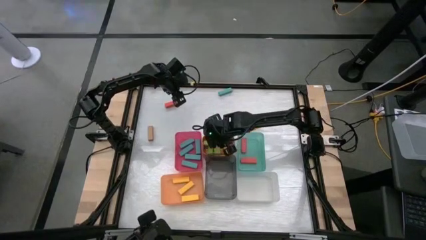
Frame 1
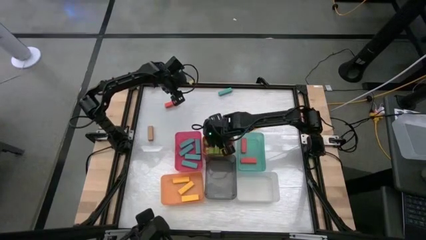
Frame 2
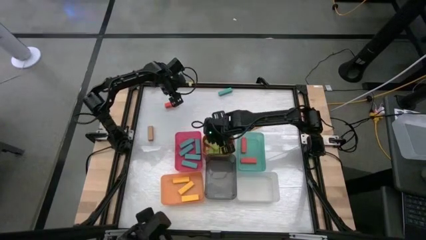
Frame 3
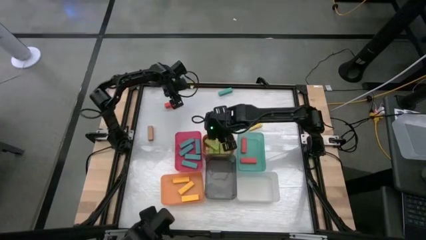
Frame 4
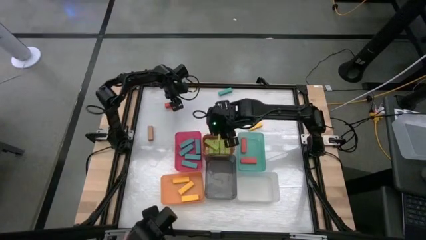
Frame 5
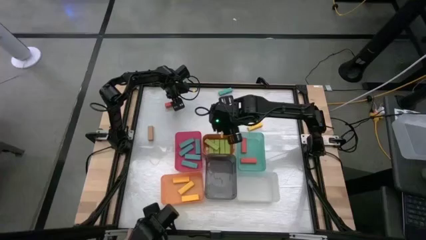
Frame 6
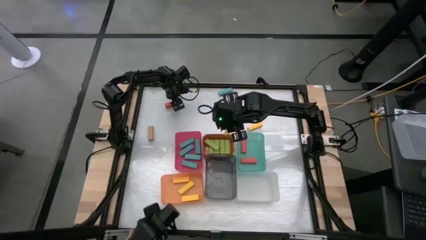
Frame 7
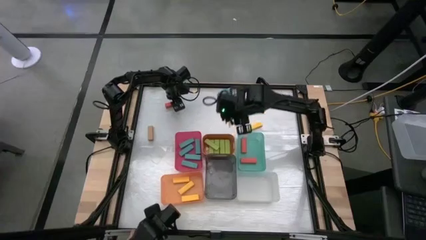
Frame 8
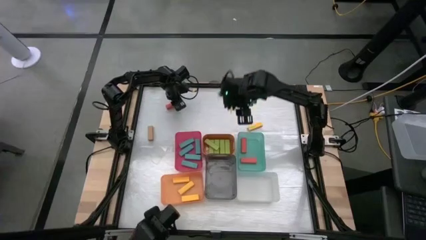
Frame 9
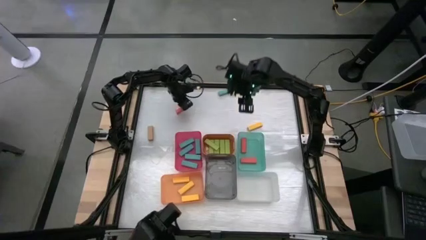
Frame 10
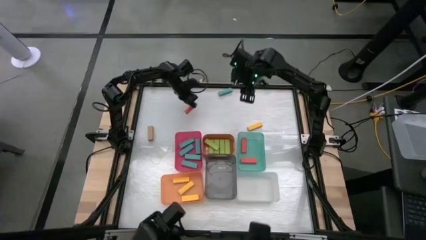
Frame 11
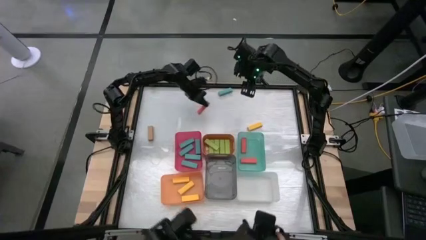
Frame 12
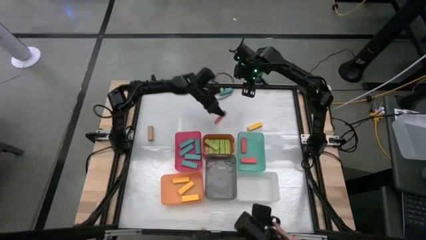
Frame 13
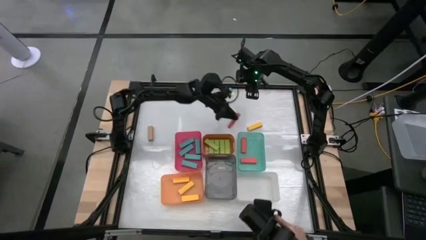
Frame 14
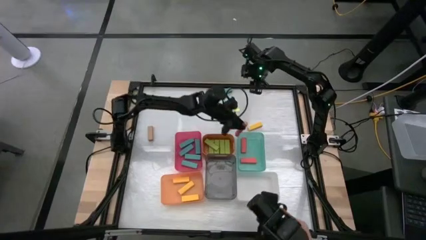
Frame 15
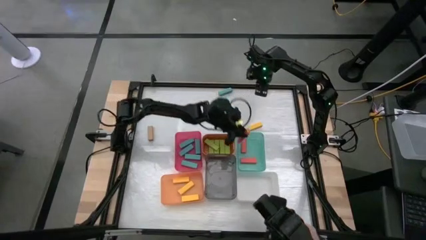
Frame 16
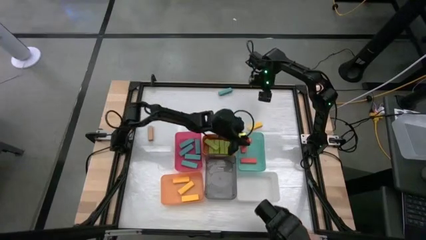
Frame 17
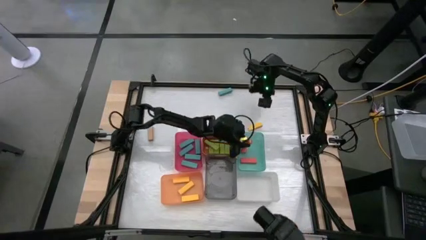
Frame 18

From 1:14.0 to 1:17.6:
Task: Sort blocks
Put the orange block into the green bin

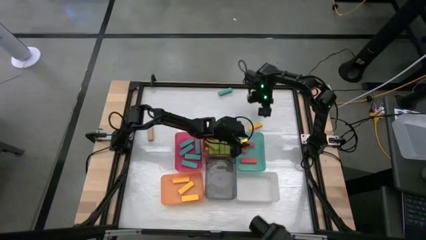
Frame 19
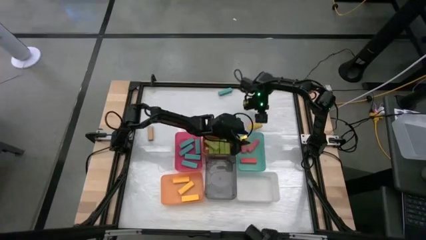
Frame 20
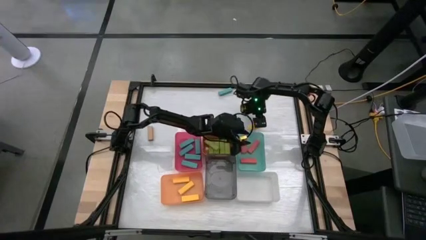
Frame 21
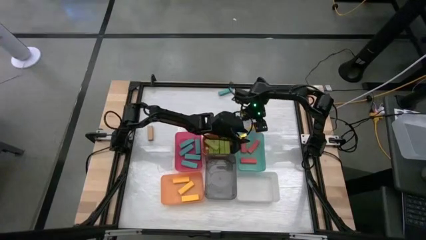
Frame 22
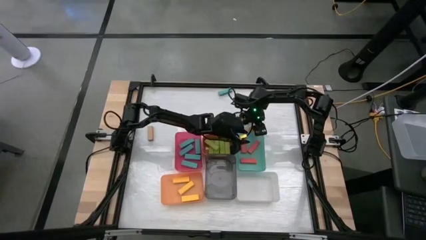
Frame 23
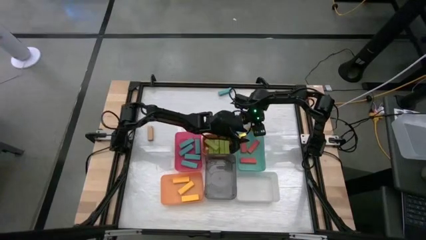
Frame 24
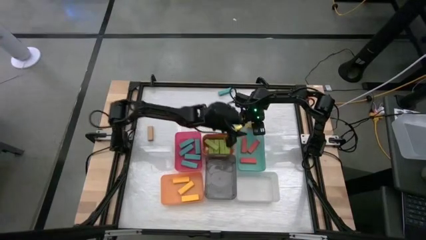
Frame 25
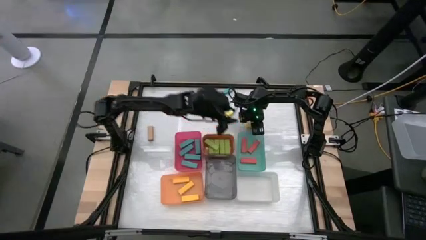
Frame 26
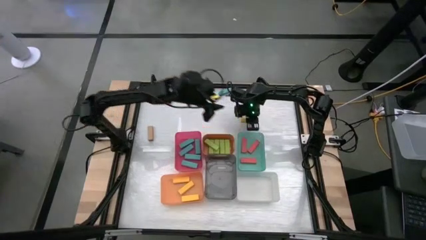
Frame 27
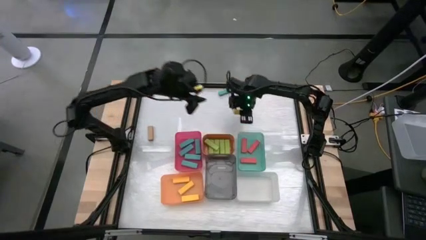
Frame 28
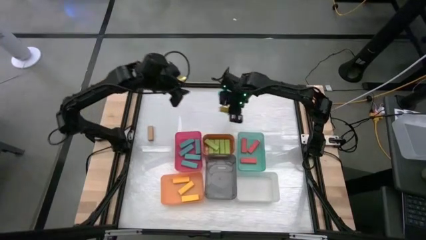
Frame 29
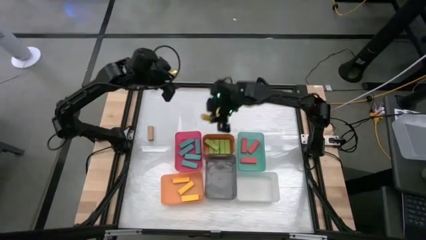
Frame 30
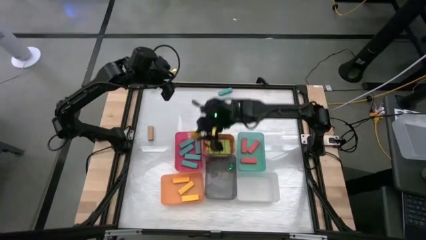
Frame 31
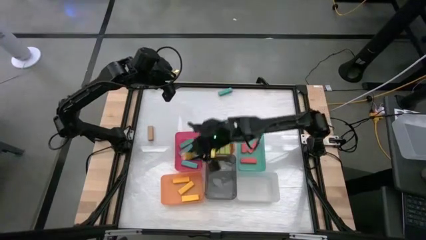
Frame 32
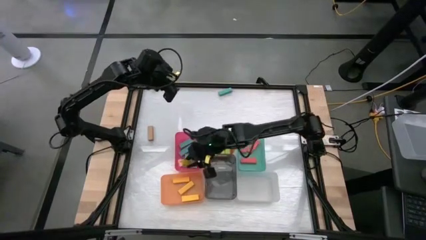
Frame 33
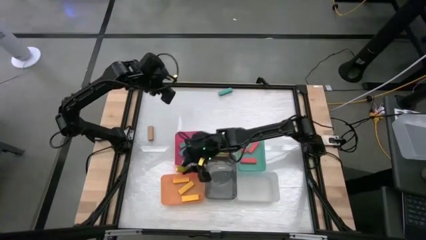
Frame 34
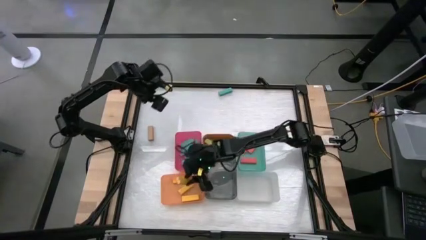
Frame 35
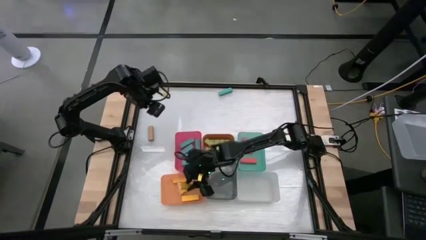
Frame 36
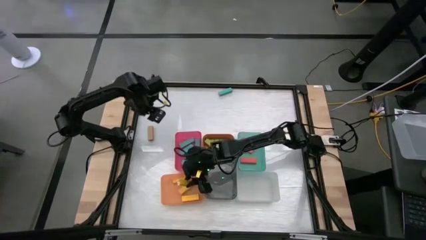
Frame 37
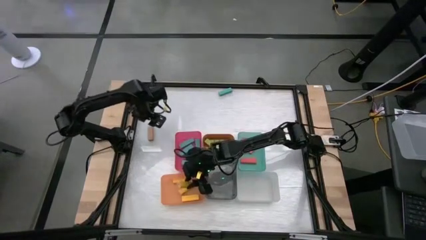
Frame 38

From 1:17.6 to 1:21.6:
Put the yellow block into the bottom orange bin

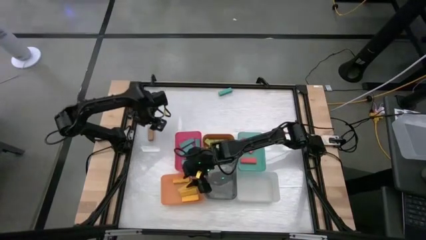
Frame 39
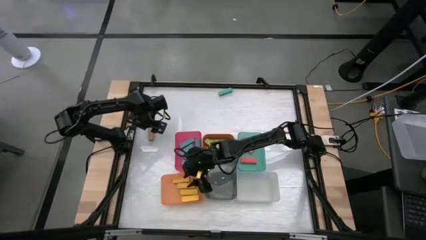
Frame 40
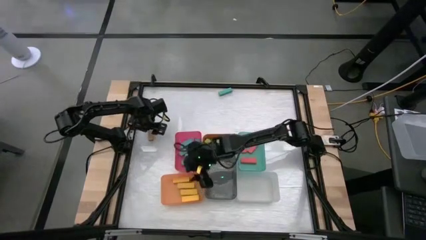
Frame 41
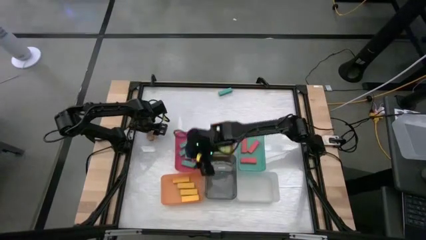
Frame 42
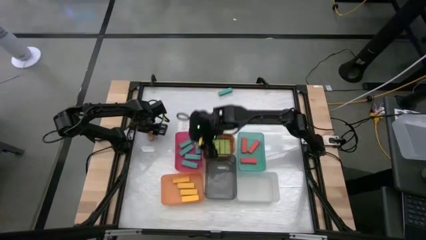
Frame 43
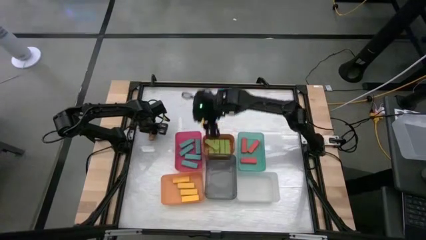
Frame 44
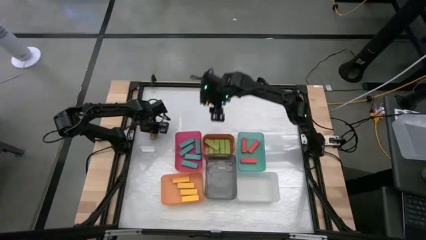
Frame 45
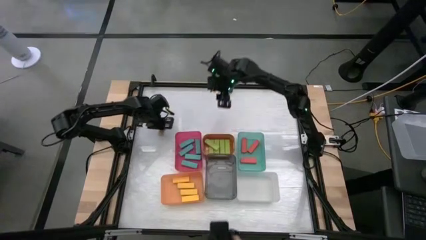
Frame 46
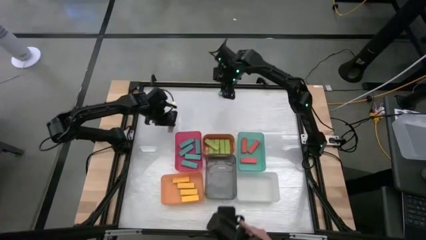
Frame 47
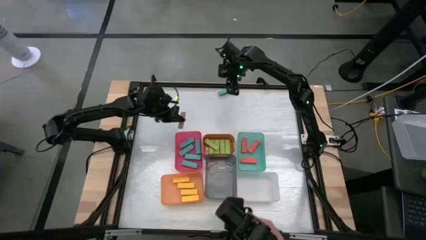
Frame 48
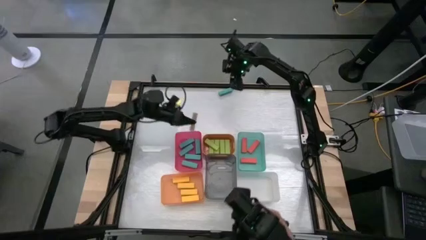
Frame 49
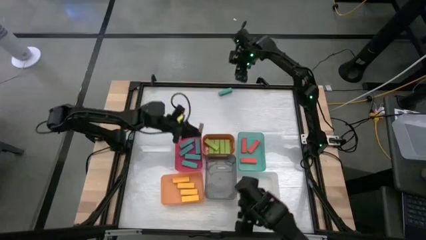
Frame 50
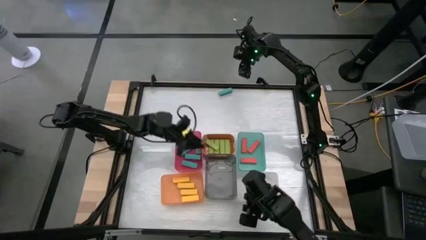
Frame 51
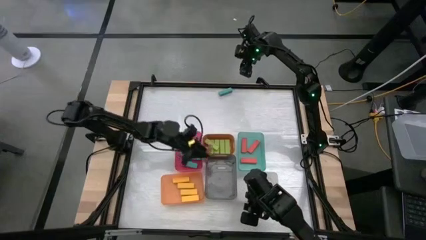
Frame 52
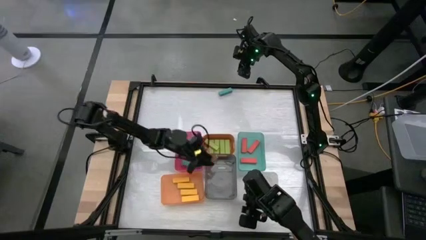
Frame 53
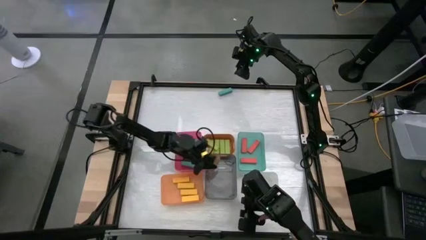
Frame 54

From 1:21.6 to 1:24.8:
Put the brown block into the black bin

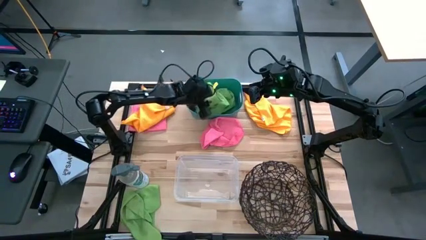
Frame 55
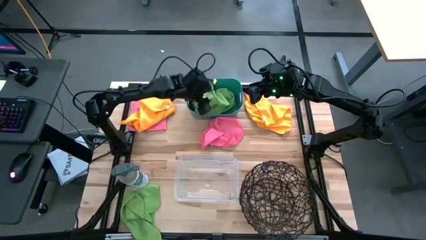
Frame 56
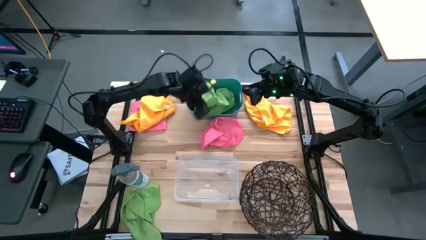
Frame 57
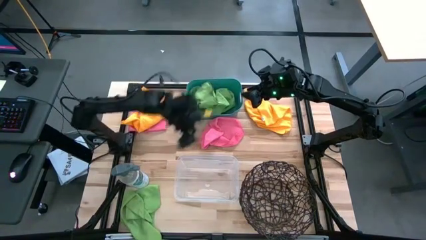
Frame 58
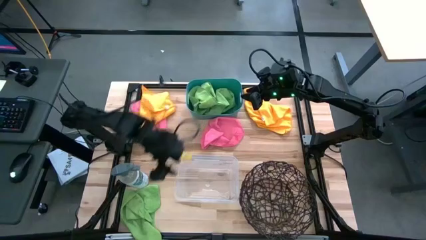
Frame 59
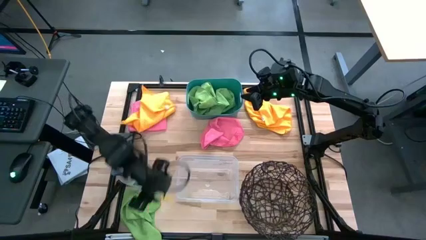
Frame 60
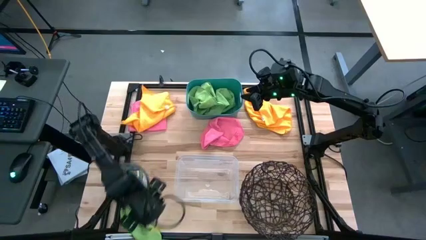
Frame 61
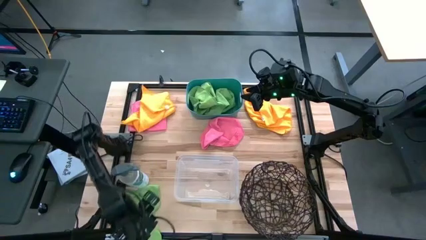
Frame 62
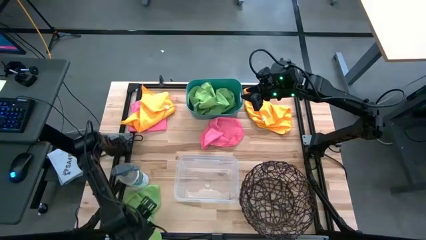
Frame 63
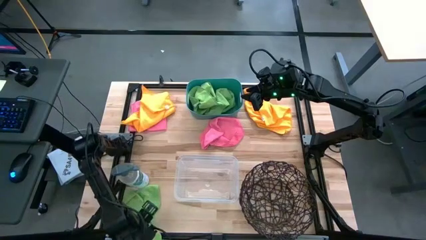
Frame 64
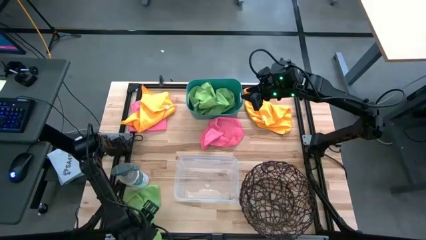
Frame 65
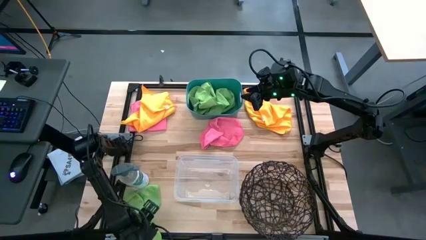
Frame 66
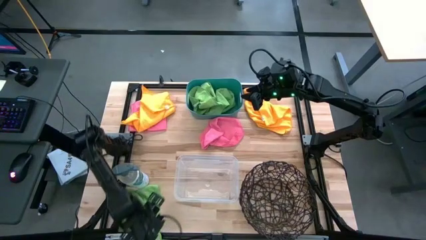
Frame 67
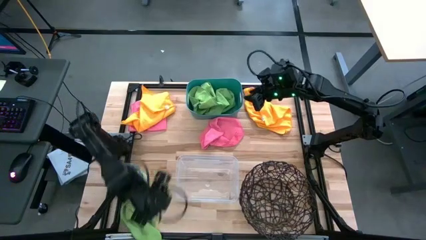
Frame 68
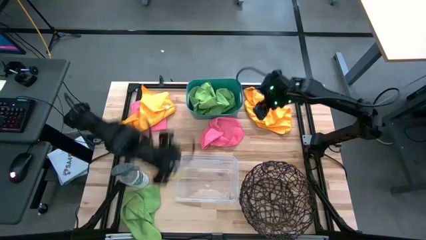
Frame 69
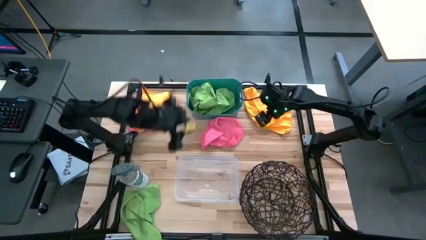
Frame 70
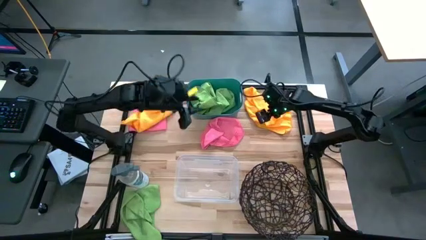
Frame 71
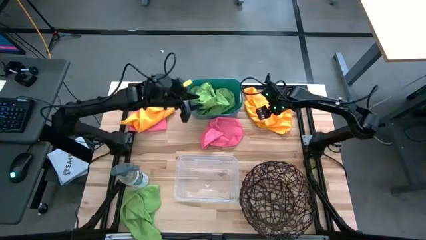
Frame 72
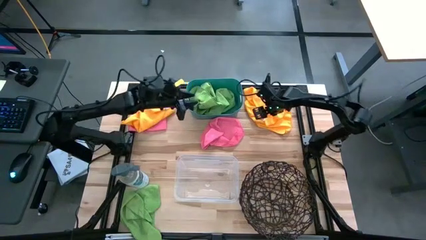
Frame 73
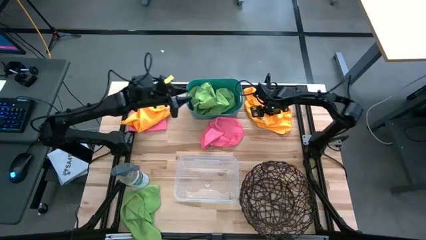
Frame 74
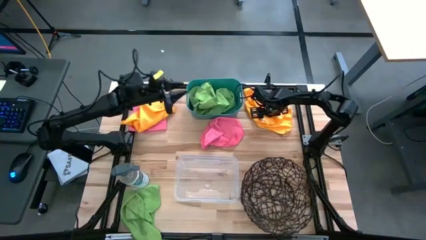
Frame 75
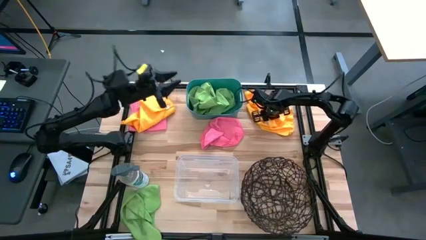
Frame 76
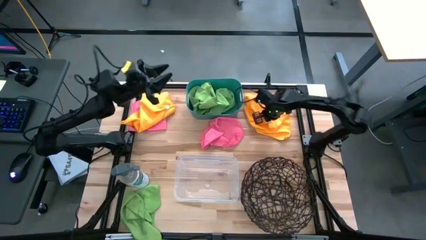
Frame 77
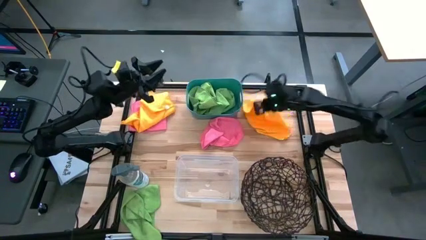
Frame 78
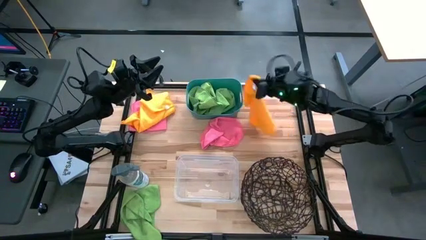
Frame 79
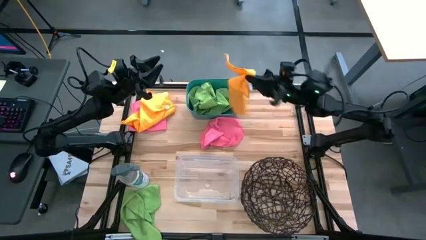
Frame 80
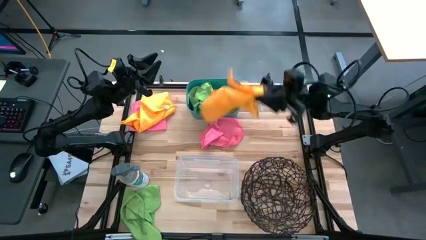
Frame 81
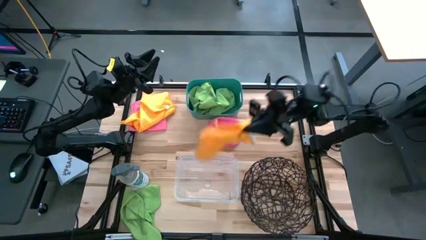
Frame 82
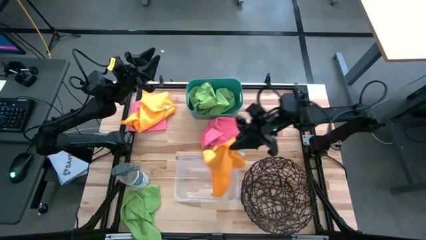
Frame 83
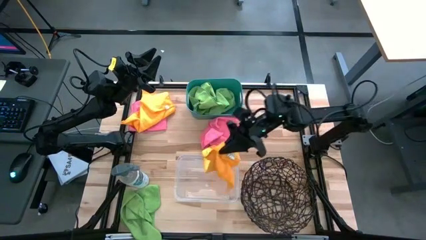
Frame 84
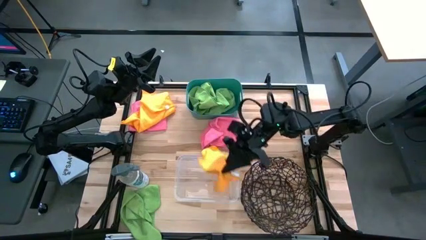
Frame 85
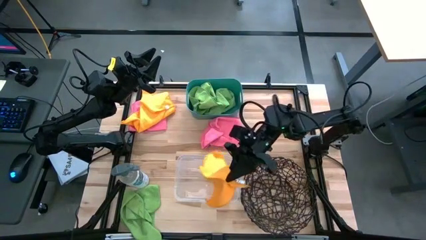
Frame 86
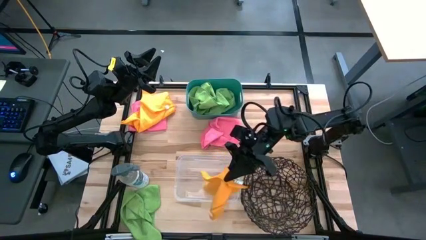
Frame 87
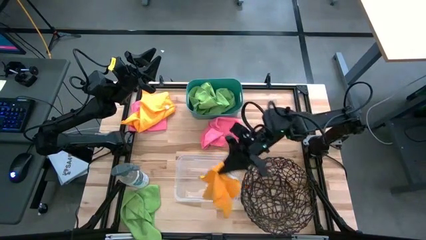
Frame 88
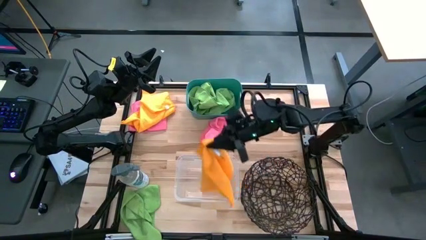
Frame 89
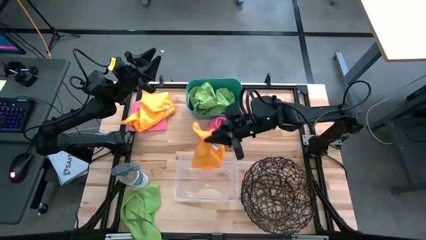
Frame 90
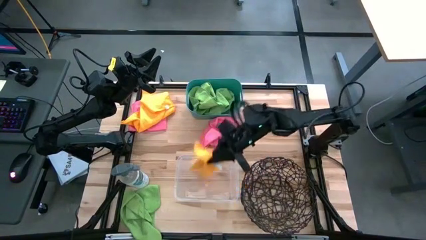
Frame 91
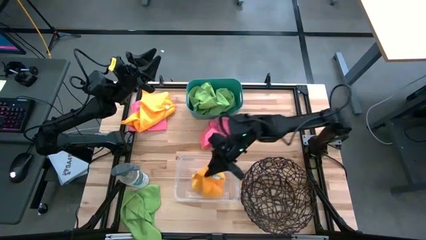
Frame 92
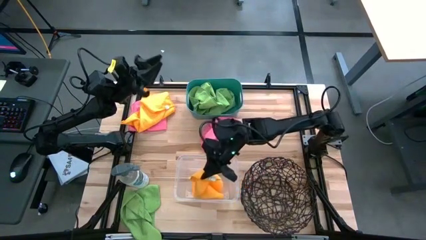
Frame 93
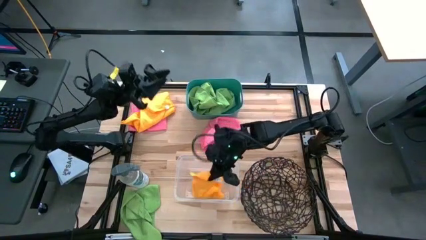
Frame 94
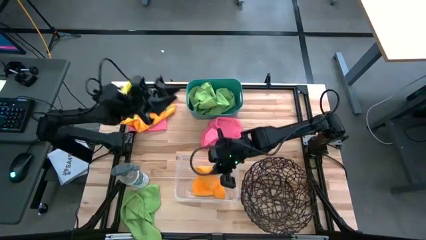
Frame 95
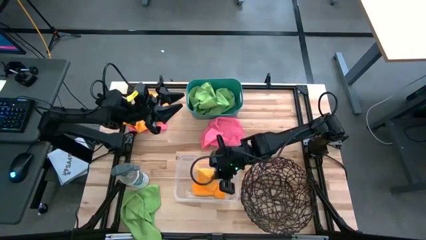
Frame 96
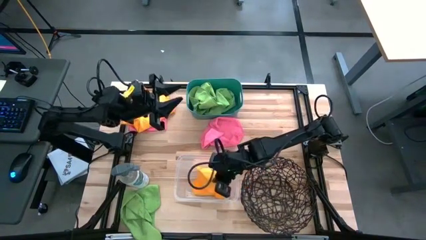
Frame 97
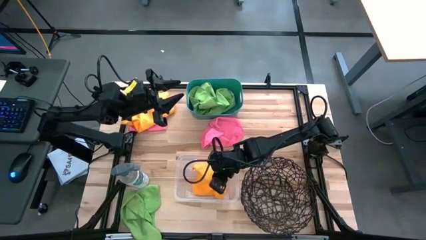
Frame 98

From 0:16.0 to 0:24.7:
Task: Sort microfiber towel by color & place in baskets
Put the right light orange microfiber cloth into the transparent bin
